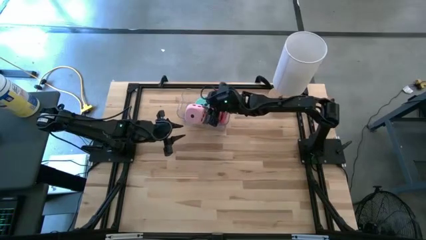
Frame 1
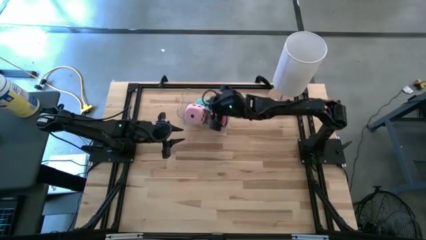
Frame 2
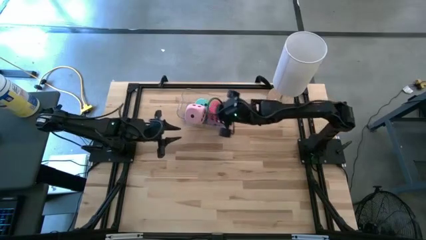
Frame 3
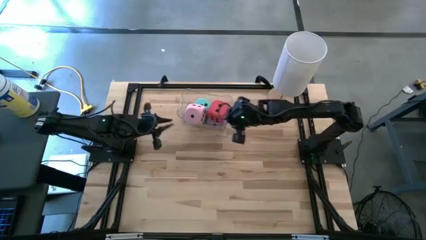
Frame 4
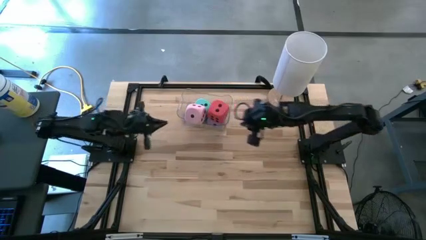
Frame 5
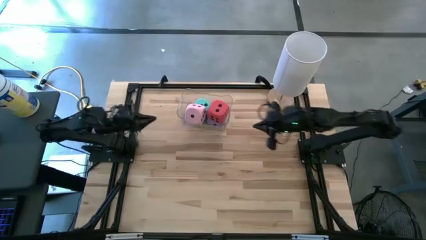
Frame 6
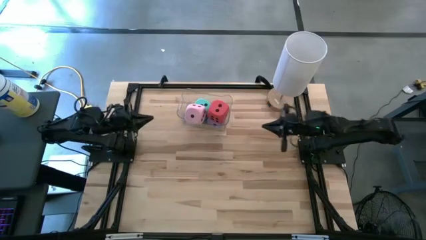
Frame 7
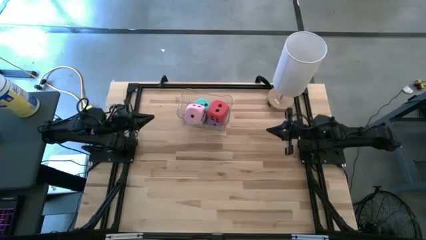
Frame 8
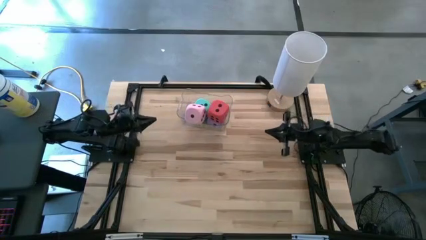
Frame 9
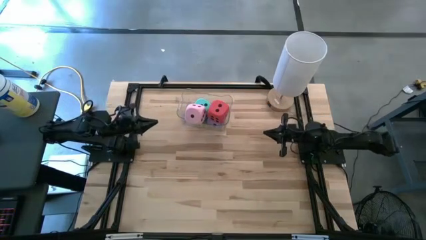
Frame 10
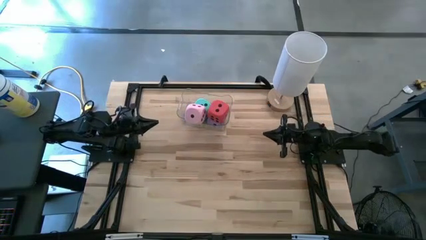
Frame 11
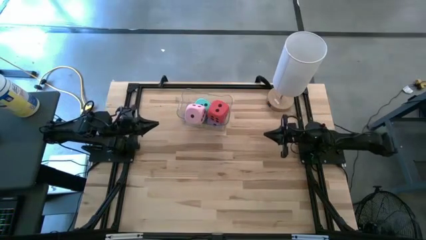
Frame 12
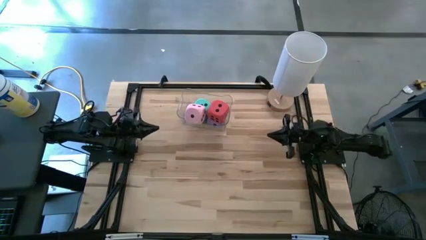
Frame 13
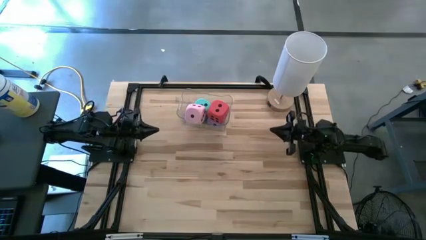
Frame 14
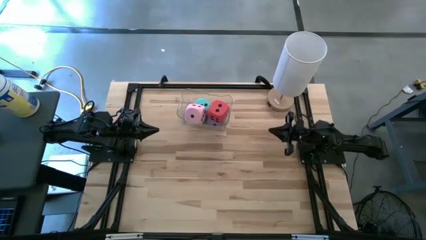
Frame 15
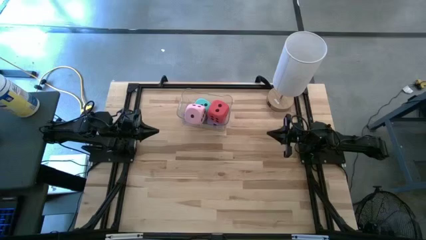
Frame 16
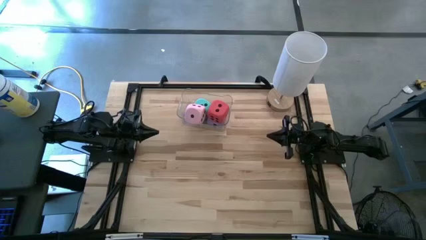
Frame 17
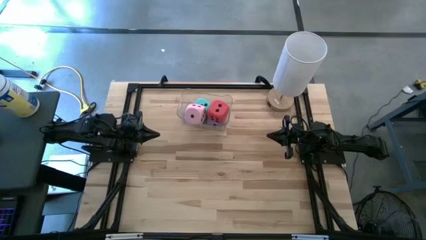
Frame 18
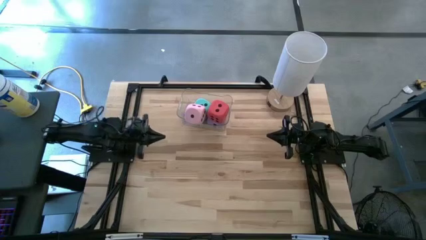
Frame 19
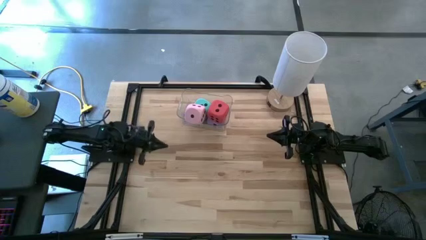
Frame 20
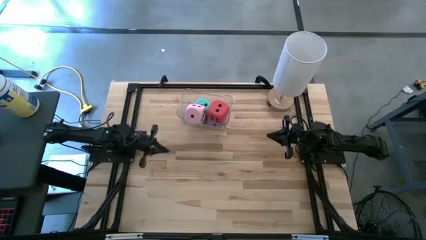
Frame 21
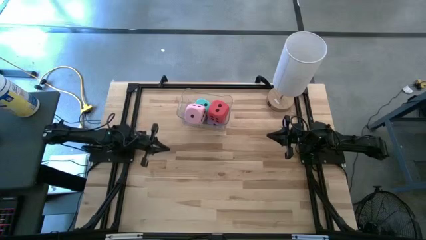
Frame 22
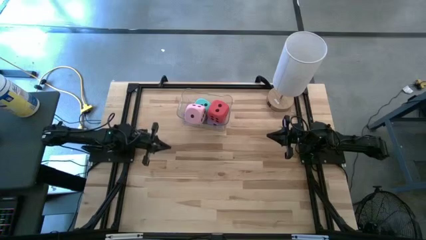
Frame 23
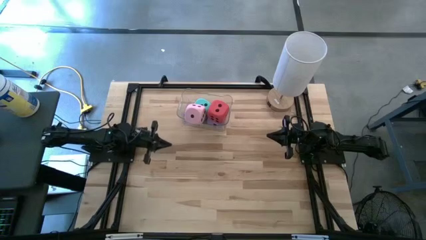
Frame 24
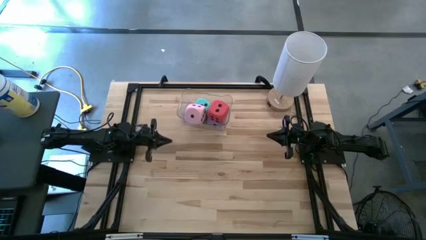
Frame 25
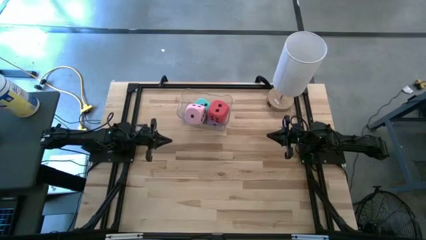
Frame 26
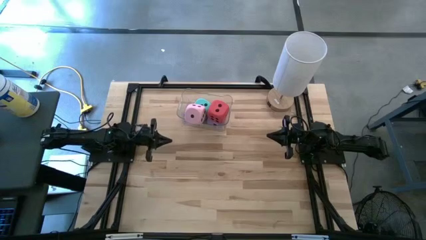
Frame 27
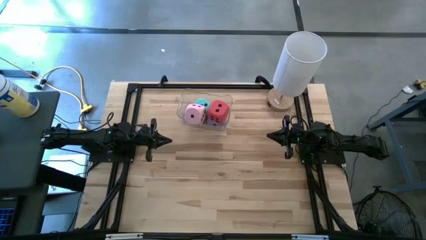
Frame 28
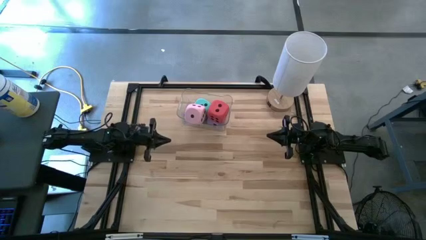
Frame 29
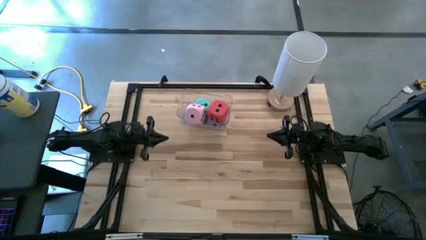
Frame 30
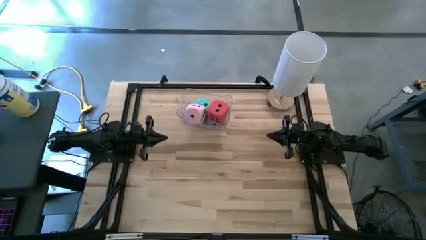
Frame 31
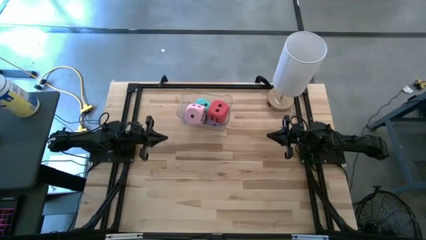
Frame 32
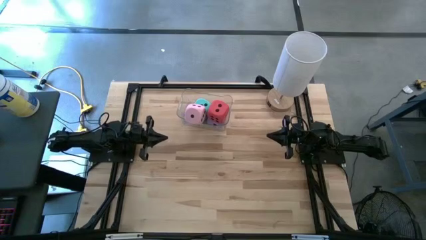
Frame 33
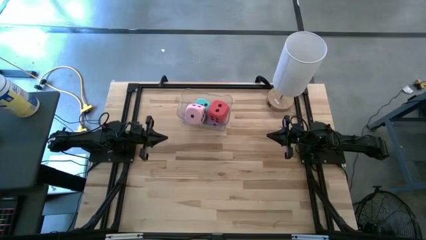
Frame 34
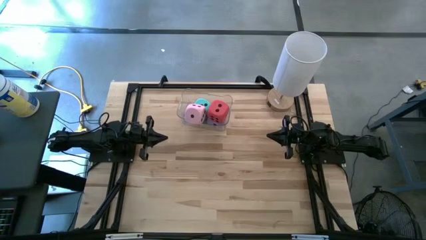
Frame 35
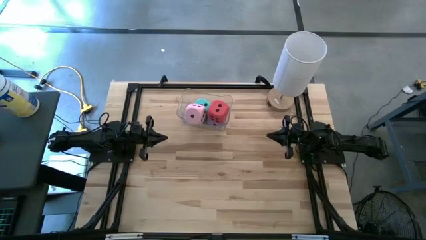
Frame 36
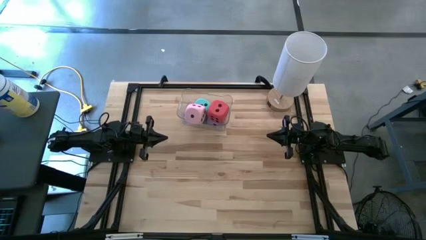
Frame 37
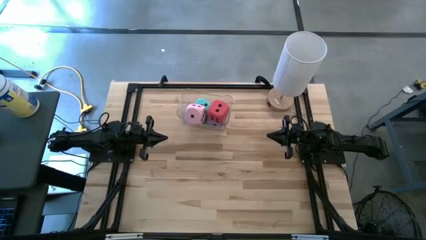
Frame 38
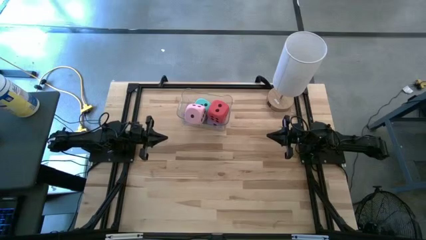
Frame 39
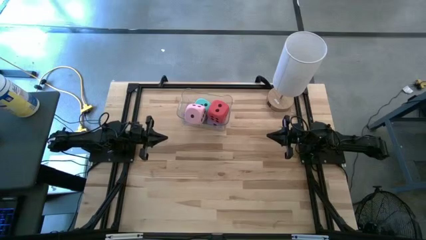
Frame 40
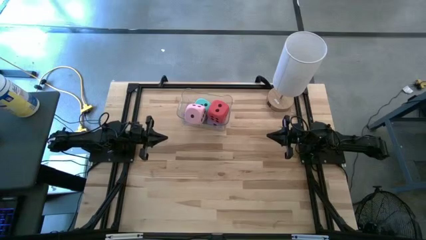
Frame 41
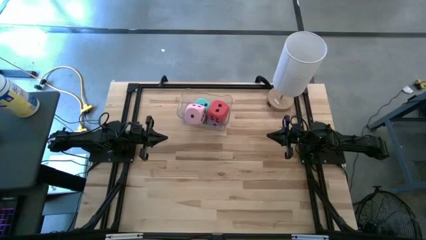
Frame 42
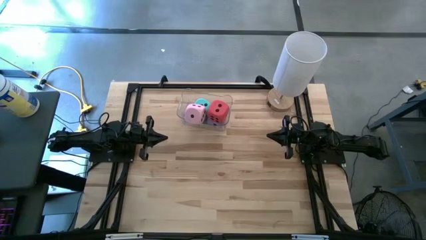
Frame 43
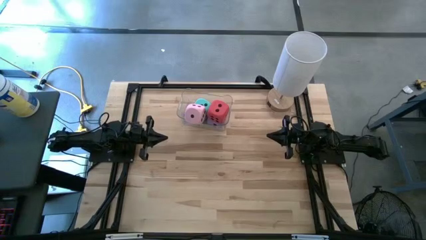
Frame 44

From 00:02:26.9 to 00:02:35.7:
Task: Pick & Place Dice
Return to home position

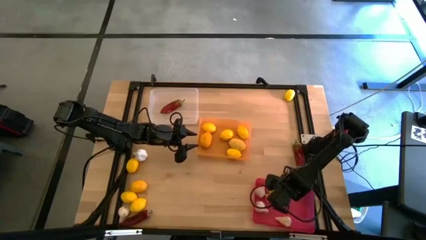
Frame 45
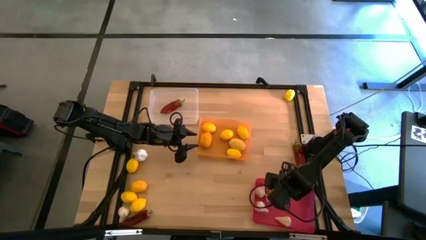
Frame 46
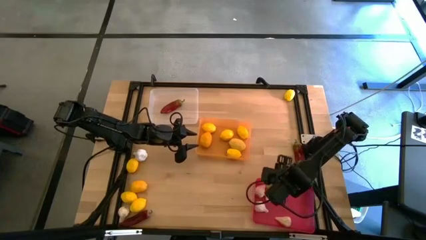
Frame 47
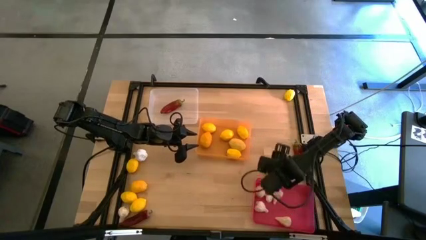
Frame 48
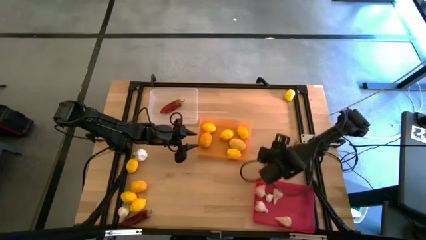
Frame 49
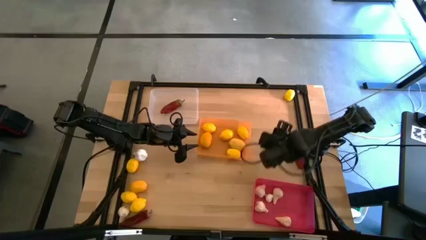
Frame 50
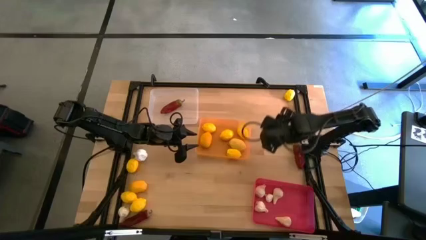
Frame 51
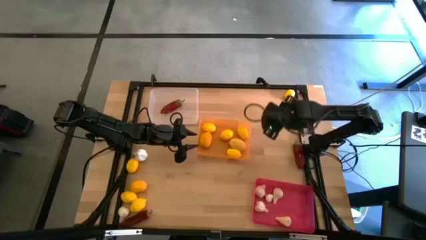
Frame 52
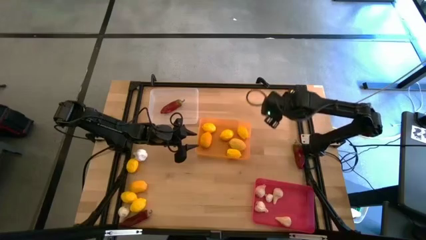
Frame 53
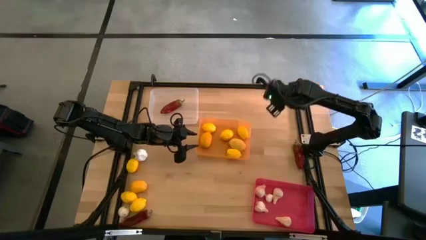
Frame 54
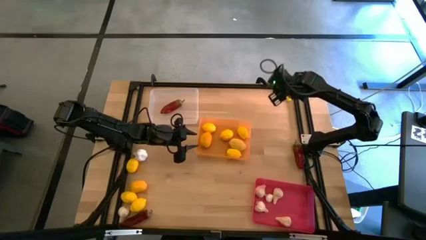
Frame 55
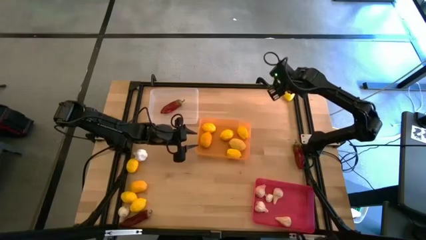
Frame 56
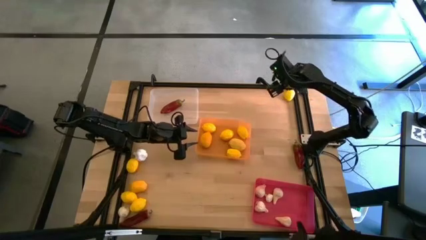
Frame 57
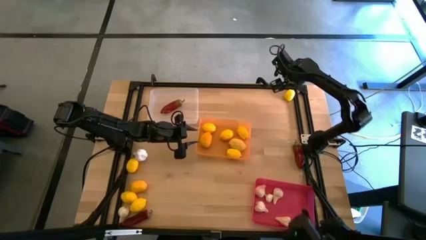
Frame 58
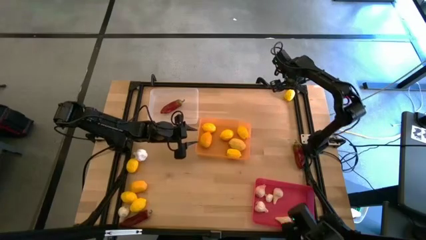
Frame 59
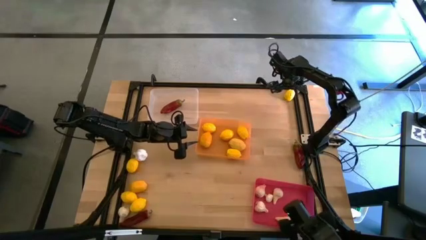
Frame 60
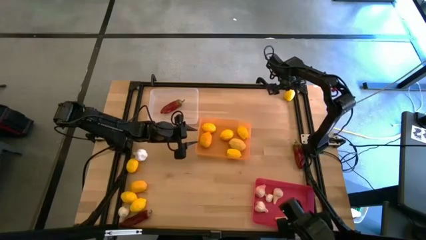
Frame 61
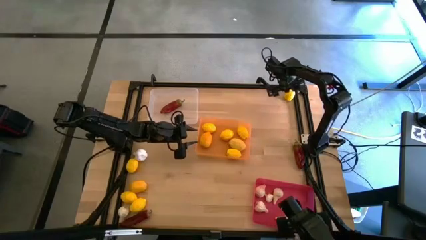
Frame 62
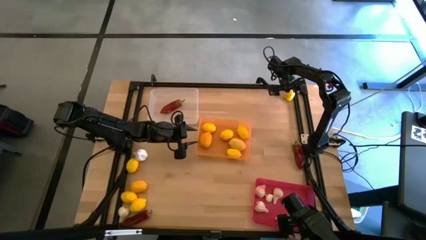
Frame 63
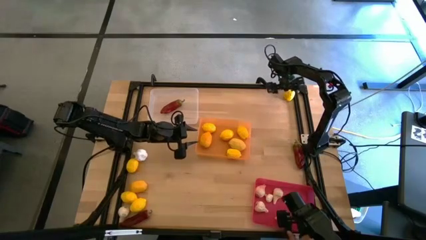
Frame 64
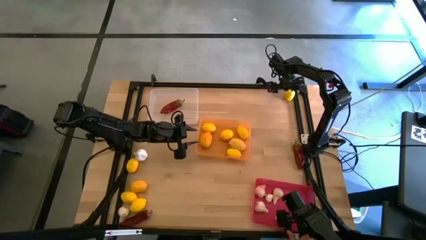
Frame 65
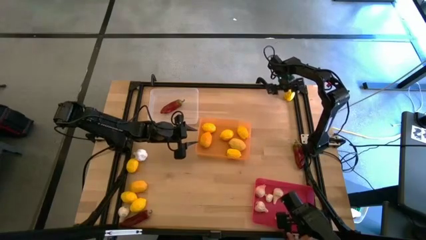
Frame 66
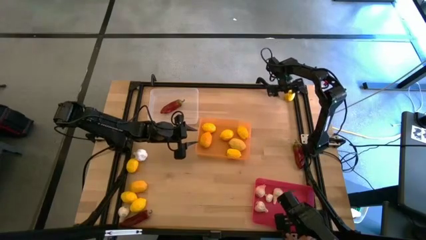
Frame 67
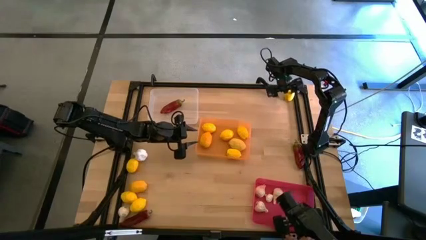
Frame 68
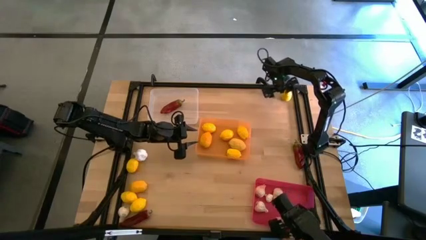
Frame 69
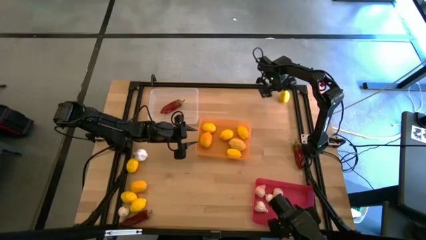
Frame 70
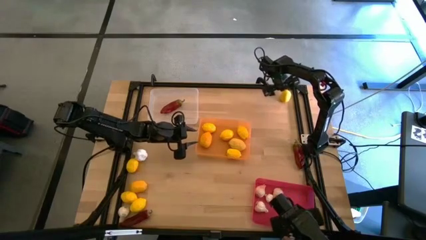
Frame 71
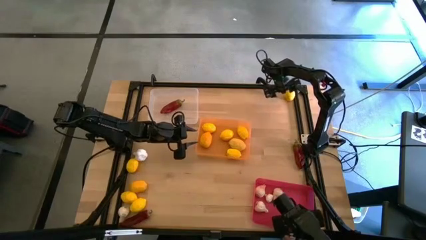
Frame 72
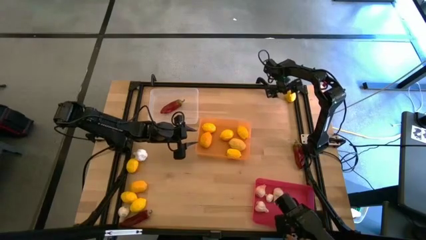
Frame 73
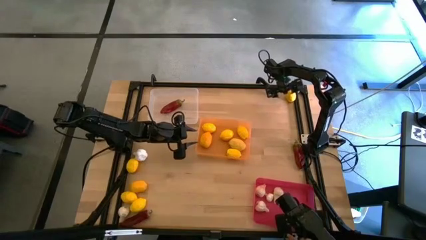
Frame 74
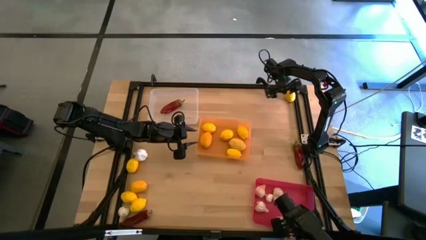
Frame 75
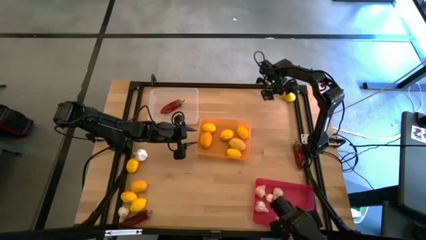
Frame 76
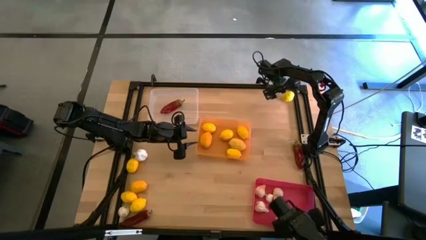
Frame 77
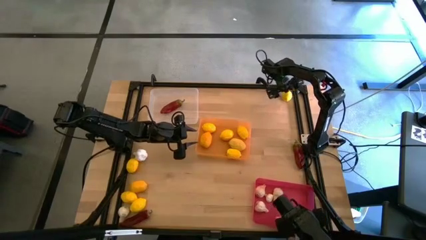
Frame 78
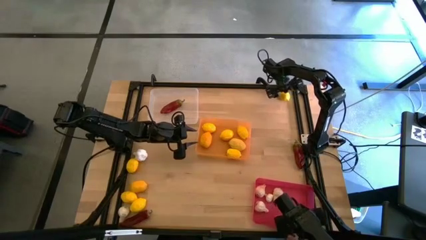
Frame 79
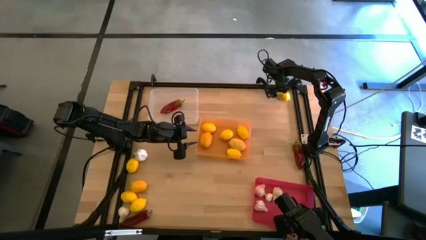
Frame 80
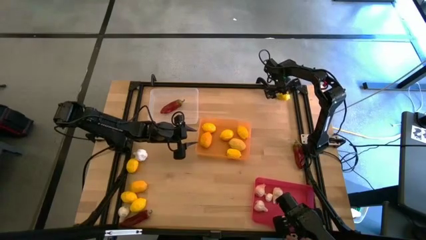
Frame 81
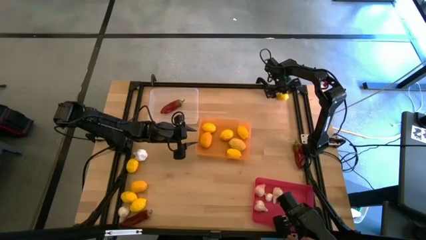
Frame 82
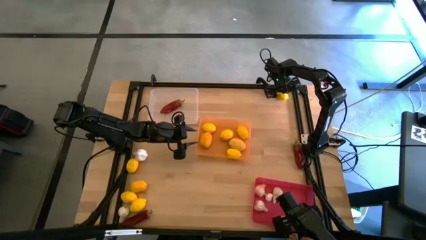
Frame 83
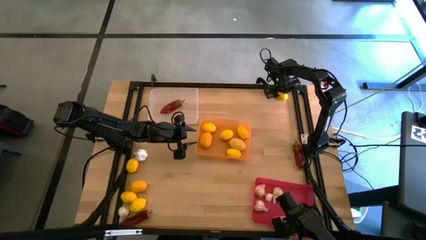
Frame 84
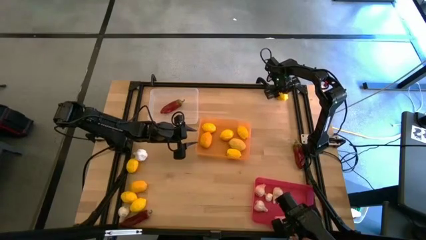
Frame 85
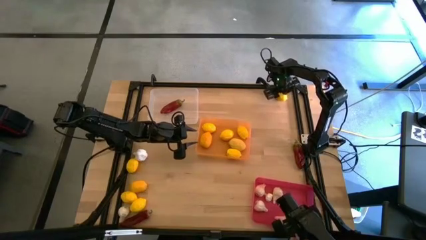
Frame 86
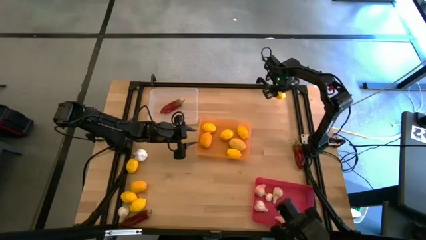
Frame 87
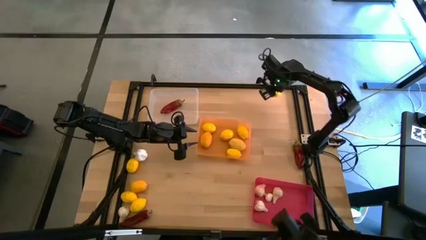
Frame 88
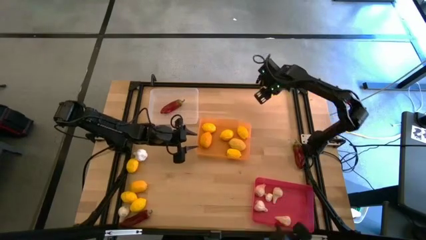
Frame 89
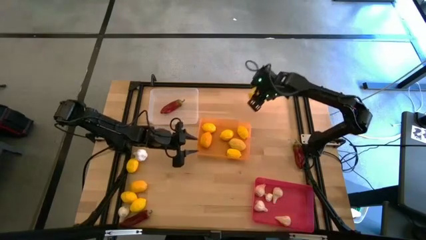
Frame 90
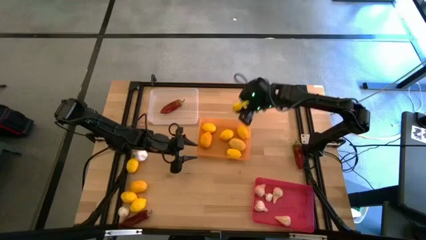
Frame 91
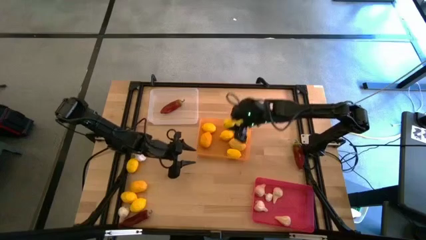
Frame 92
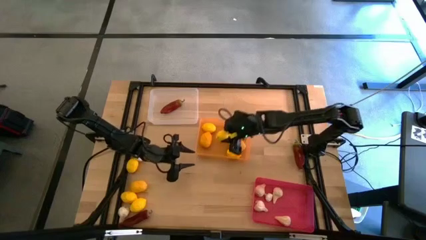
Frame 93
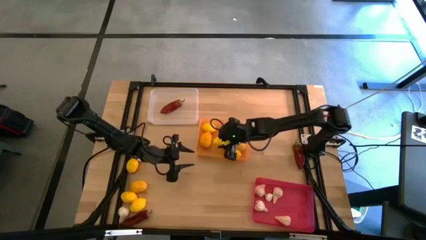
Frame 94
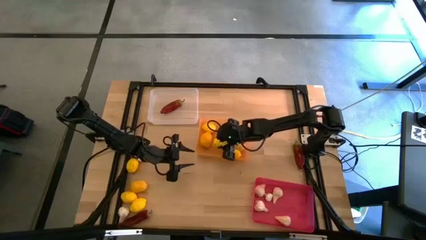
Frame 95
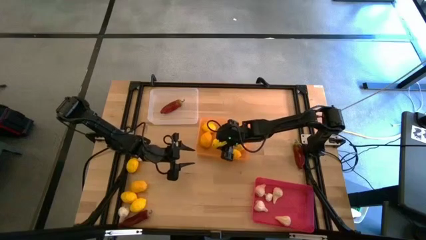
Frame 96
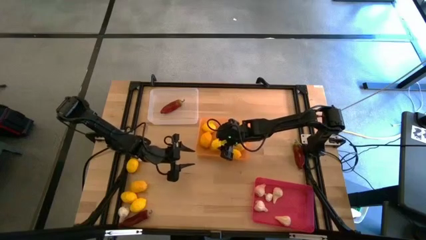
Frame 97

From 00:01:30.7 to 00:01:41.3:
Task: Sort produce into baskets
Put the lemon into the orange bin
